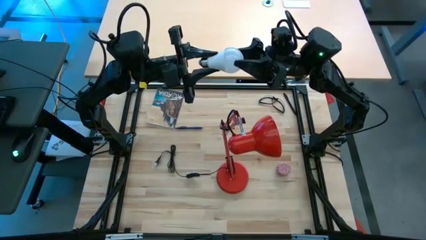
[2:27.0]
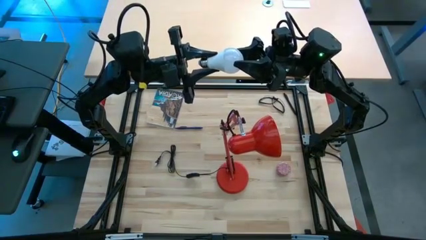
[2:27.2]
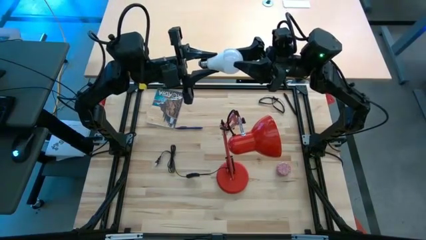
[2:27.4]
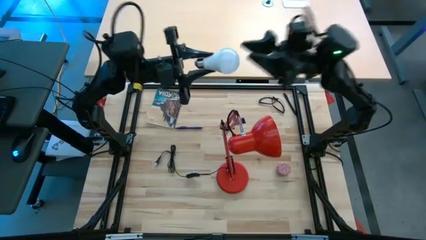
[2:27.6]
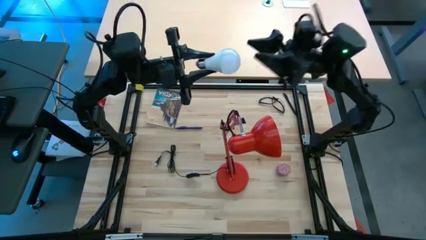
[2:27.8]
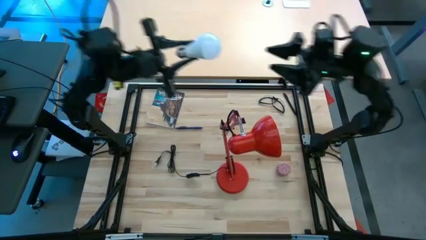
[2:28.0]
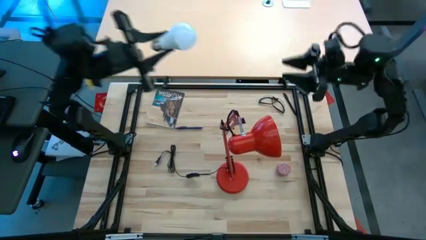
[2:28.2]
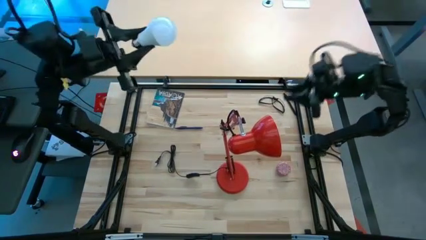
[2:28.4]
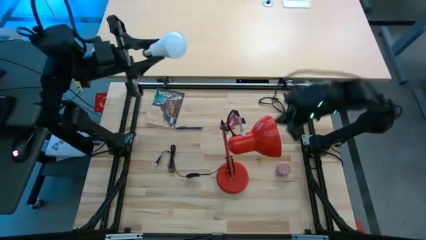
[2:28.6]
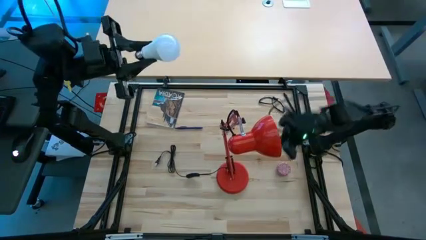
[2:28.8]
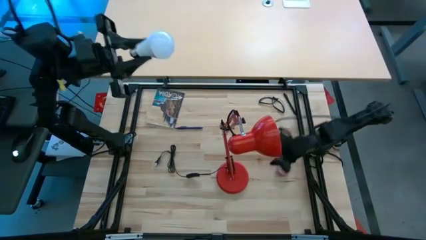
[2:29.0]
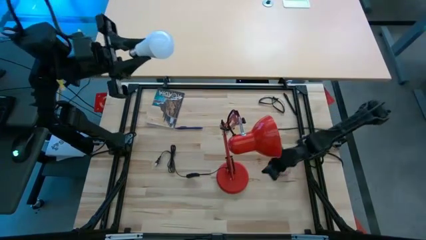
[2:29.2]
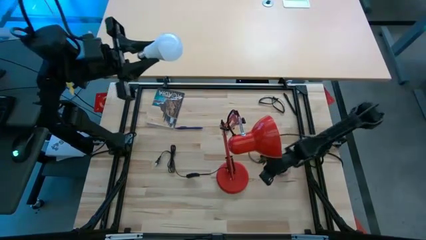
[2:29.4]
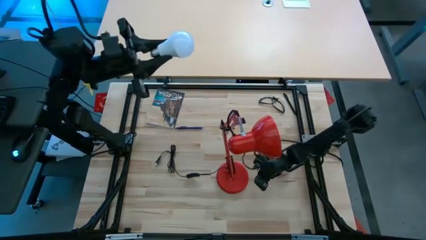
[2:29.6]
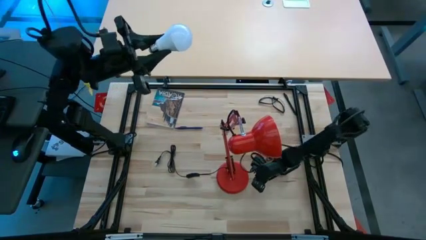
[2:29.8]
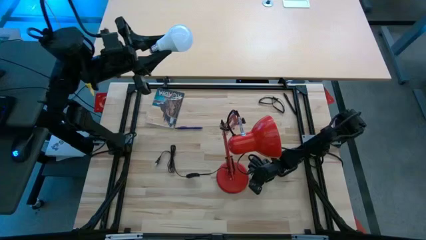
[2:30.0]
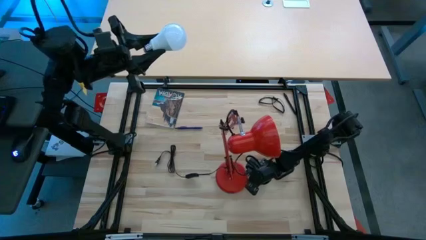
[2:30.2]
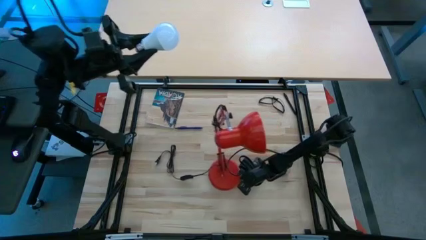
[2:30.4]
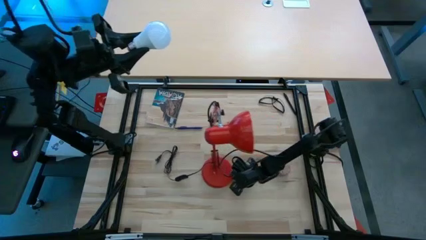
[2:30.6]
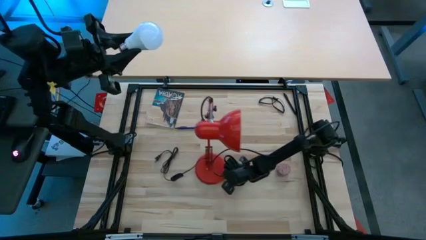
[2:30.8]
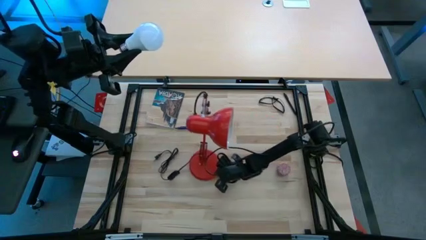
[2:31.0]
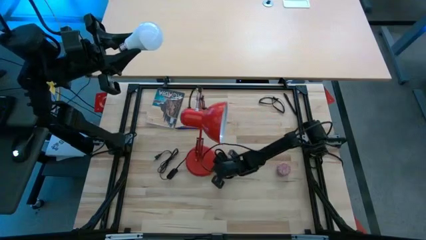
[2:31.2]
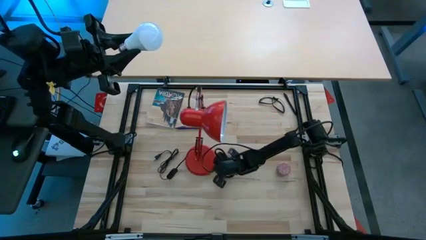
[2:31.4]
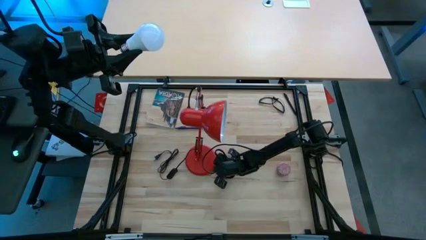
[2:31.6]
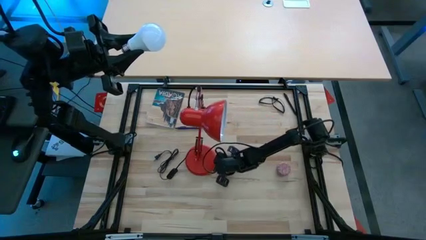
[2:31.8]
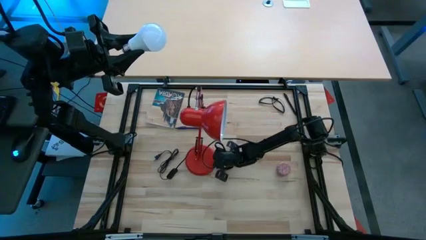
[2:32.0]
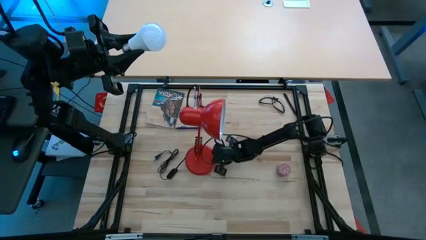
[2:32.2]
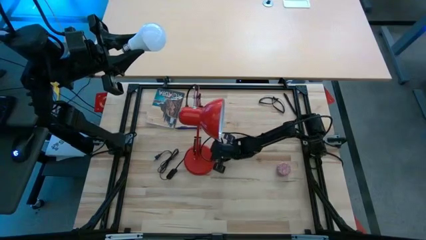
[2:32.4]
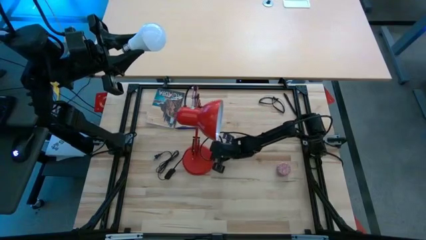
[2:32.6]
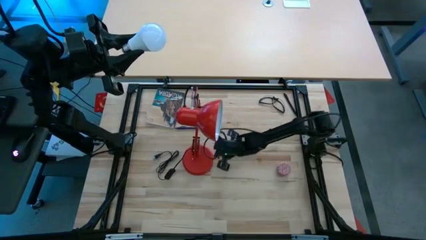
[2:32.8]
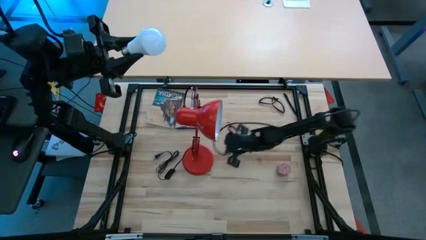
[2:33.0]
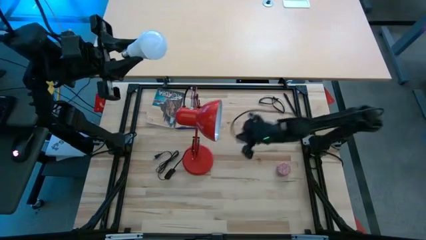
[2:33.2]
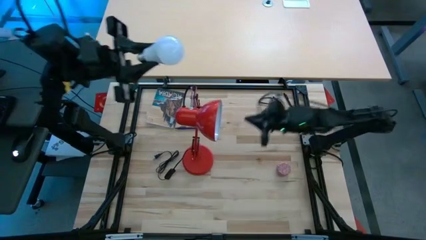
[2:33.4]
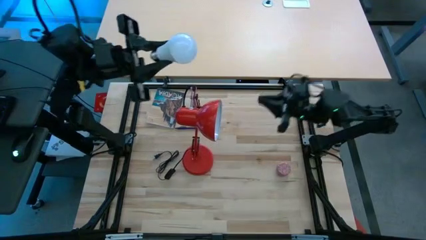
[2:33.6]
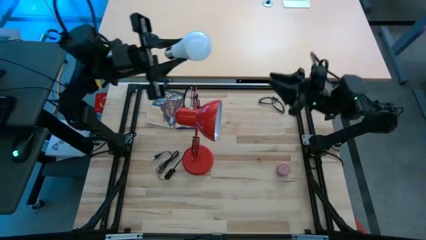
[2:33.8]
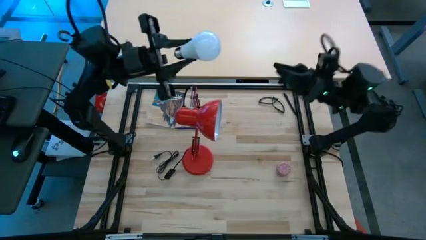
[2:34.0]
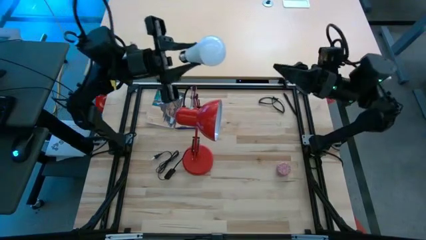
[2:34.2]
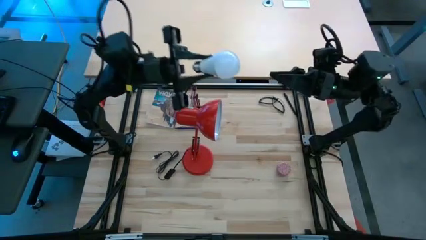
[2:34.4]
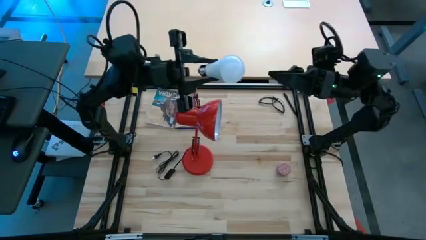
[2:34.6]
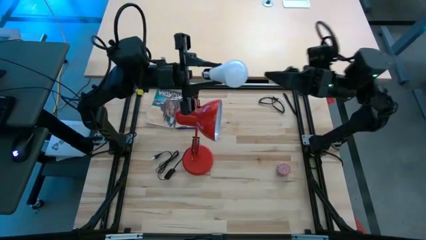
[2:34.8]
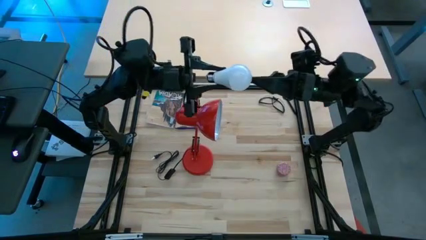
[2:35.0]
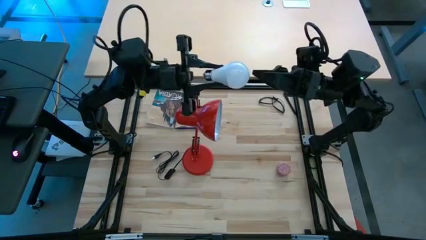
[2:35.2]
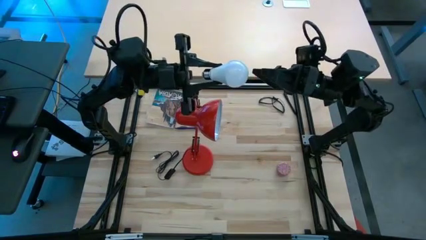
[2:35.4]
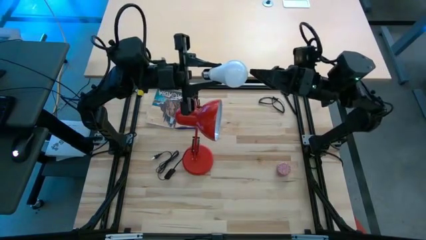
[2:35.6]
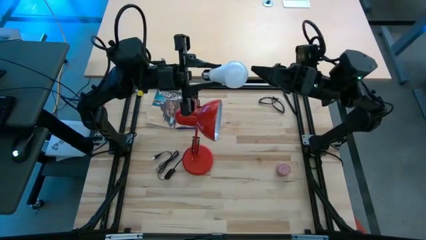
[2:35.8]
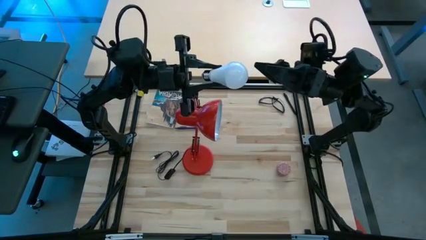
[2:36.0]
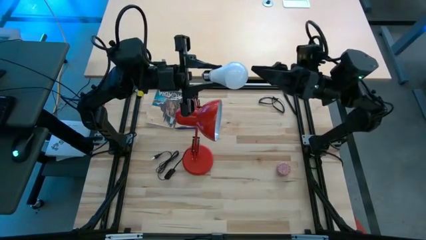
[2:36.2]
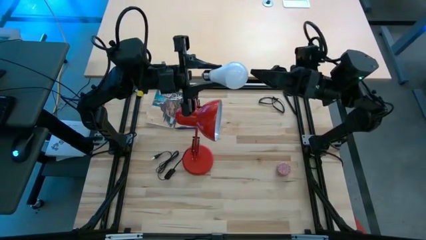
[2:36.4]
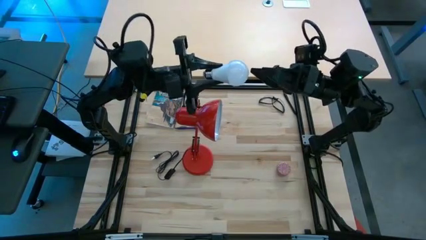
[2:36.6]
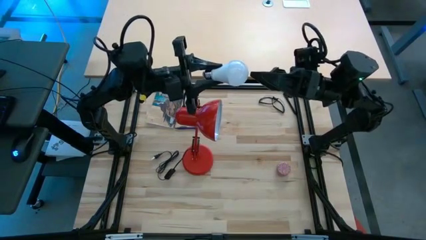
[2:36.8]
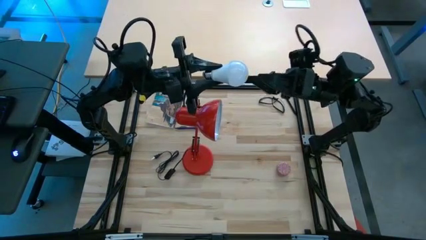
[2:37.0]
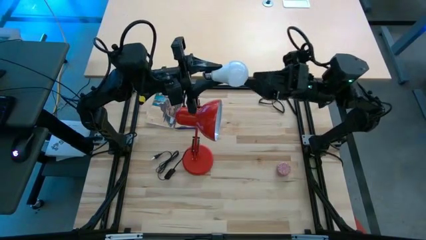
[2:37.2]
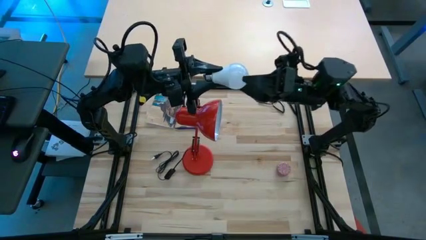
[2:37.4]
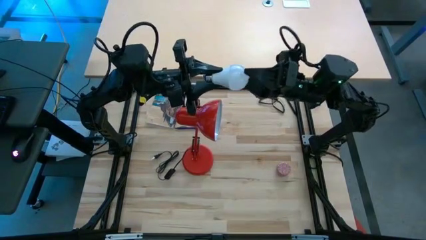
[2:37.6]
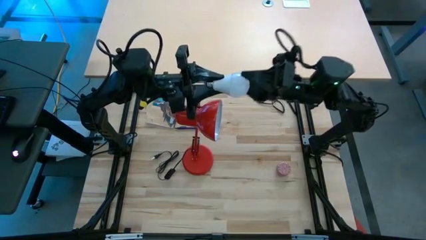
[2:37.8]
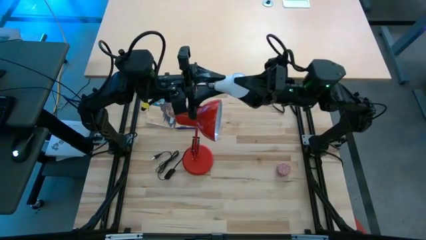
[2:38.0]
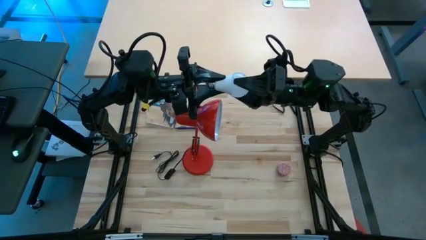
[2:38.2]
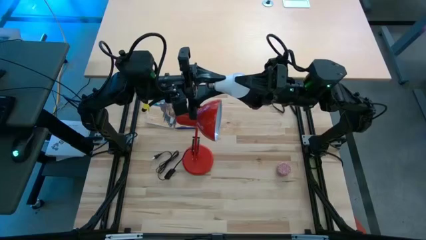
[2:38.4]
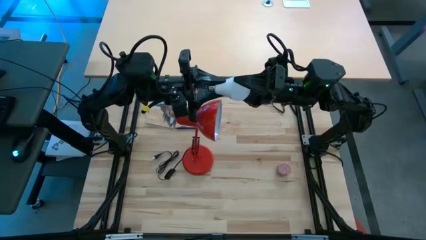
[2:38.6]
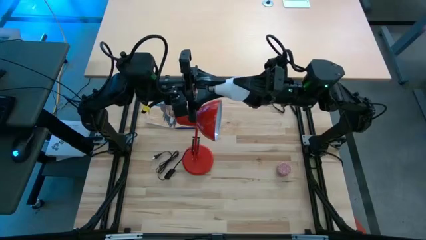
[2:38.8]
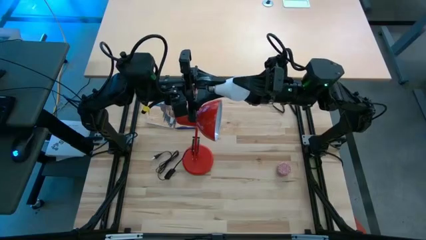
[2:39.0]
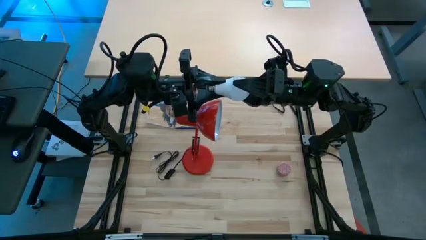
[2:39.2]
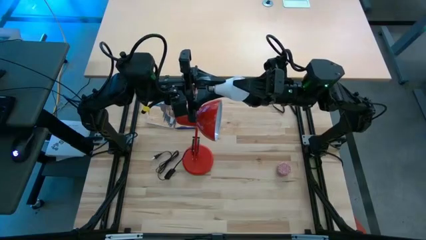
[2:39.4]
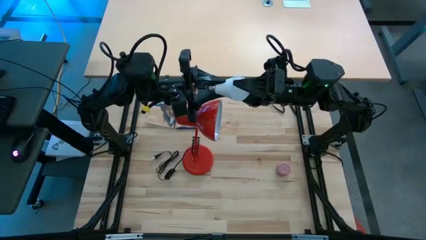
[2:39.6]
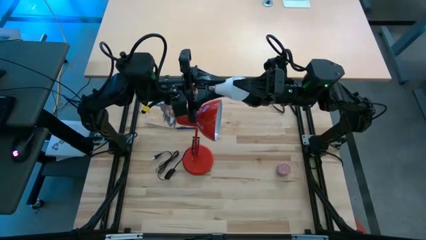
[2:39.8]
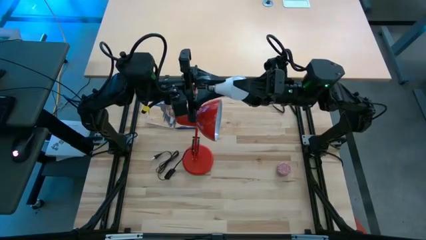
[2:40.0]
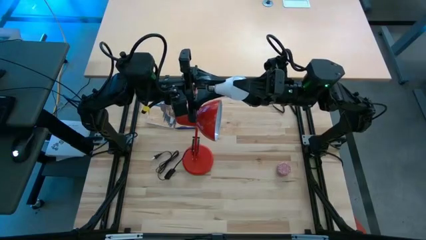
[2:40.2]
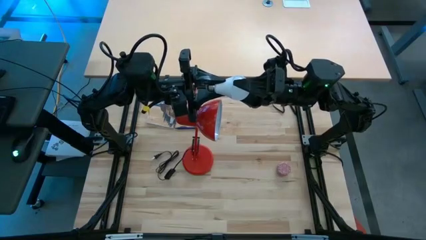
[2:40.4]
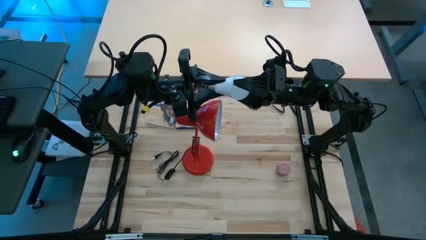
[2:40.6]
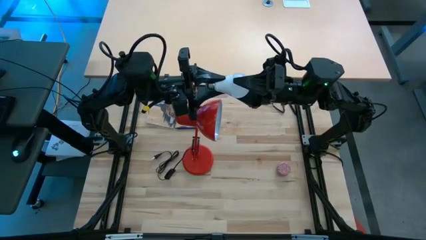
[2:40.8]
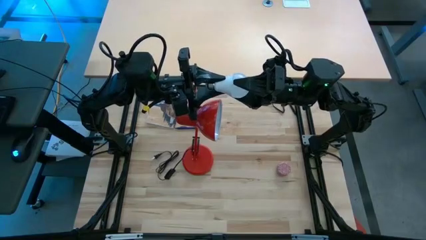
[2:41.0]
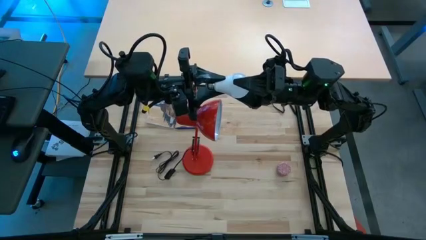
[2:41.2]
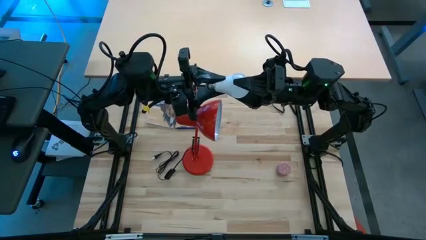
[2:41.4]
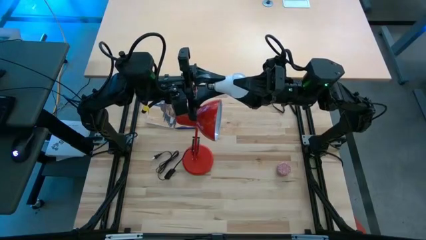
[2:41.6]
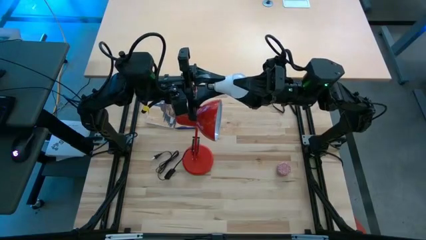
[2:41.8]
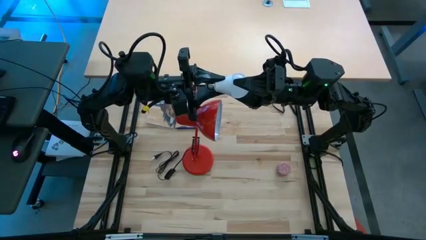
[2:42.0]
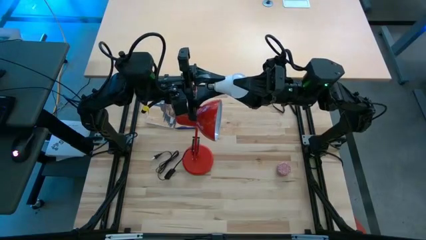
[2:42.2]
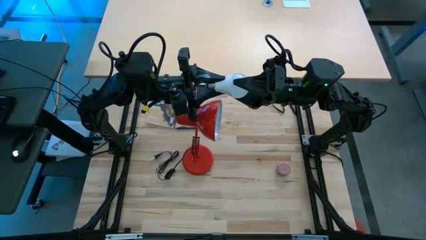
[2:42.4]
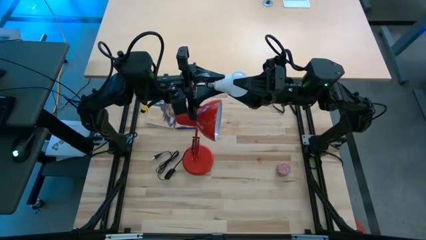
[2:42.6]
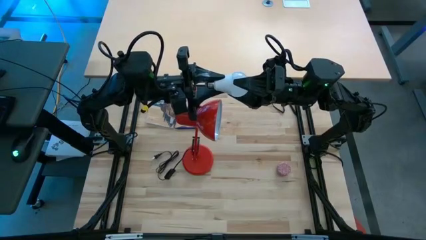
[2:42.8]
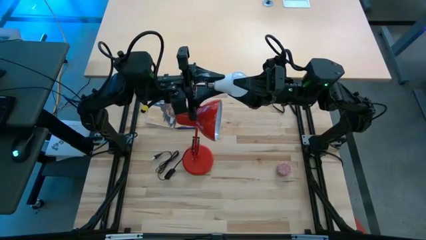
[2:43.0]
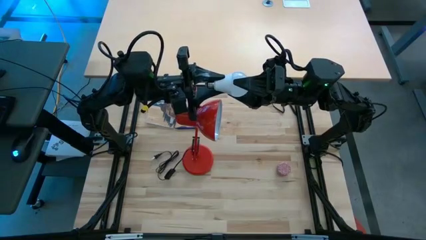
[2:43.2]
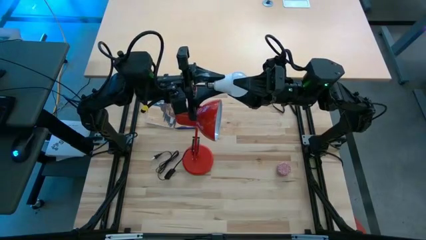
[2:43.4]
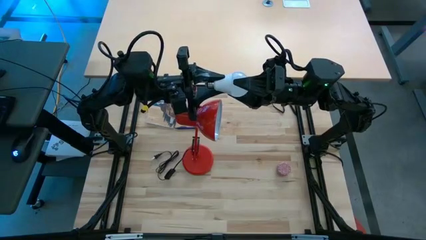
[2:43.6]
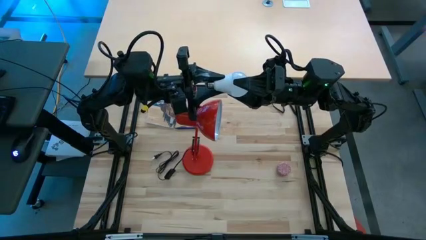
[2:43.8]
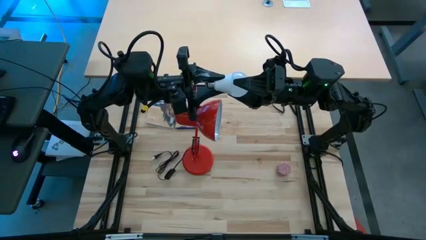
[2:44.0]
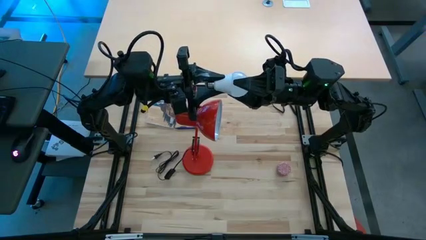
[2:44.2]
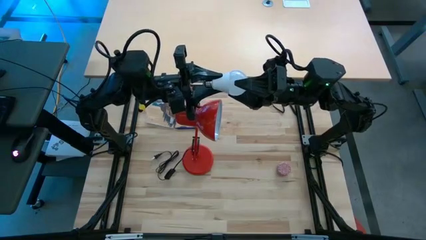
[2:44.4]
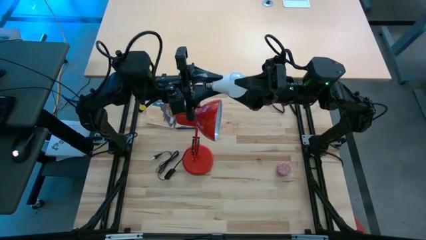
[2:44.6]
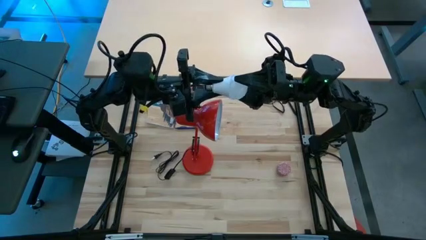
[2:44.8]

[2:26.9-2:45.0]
Task: Screw lightbulb
Insert the lightbulb on the lamp
